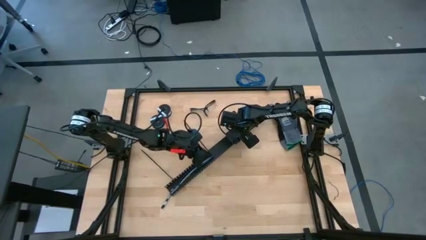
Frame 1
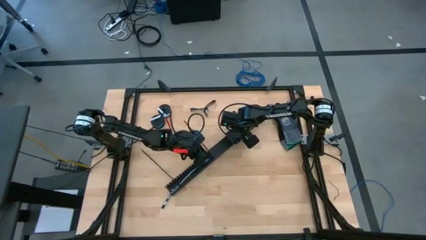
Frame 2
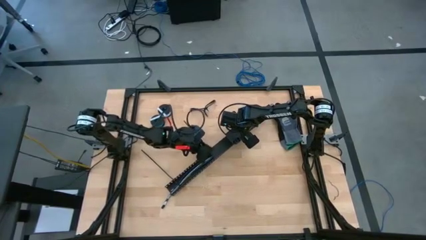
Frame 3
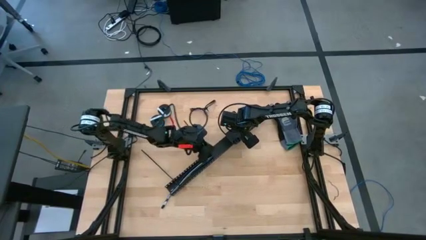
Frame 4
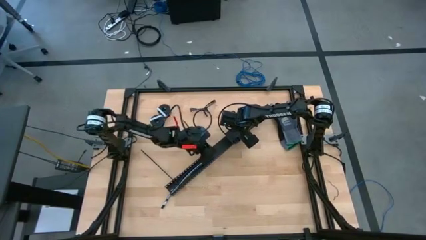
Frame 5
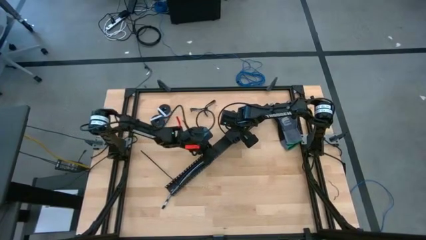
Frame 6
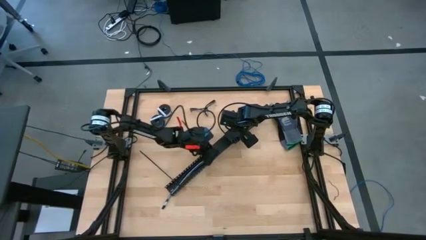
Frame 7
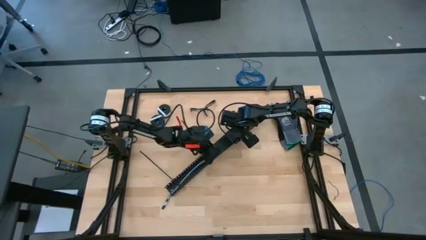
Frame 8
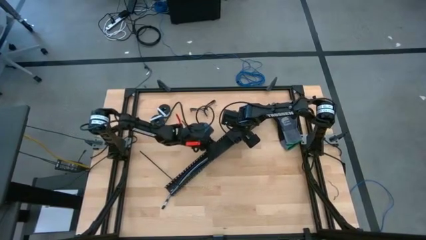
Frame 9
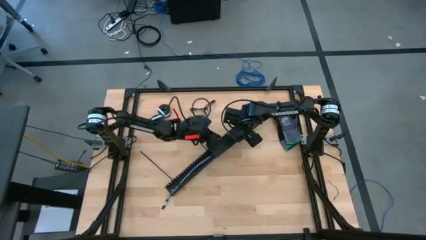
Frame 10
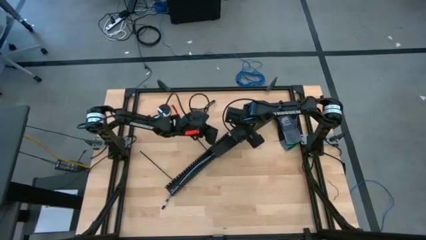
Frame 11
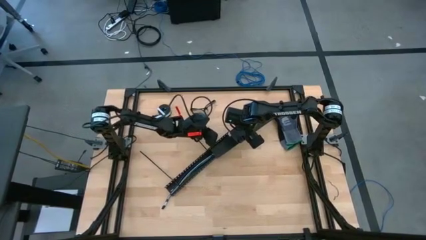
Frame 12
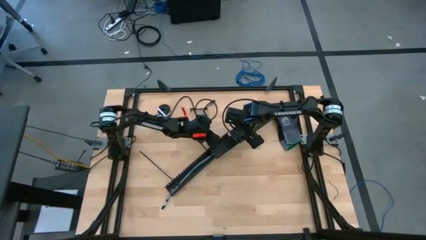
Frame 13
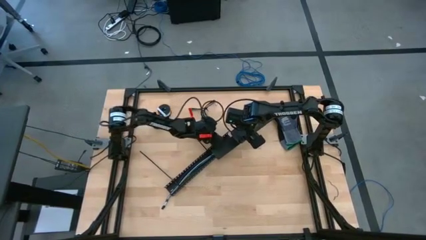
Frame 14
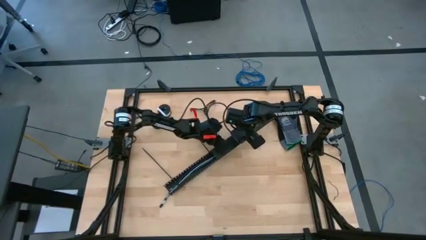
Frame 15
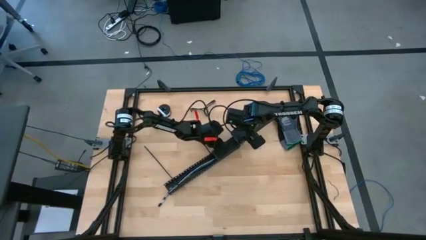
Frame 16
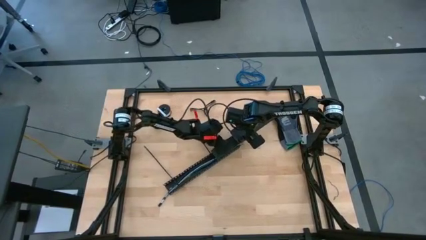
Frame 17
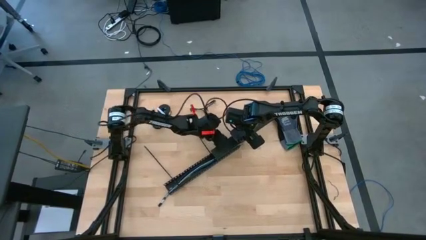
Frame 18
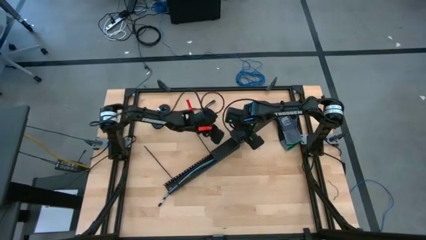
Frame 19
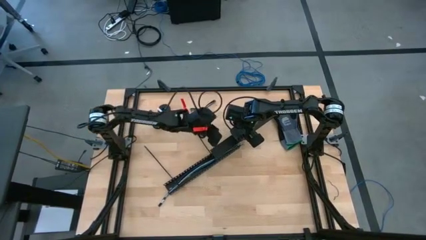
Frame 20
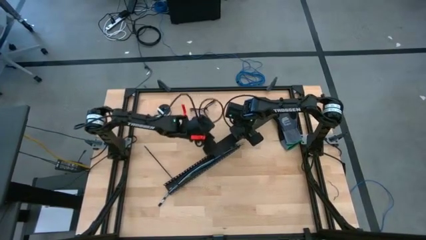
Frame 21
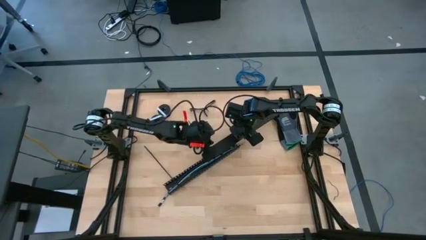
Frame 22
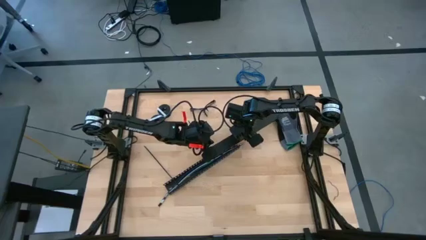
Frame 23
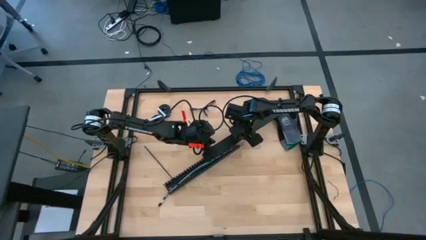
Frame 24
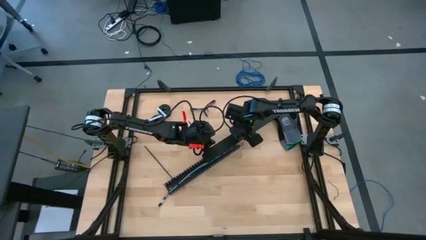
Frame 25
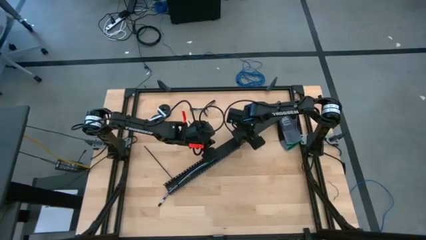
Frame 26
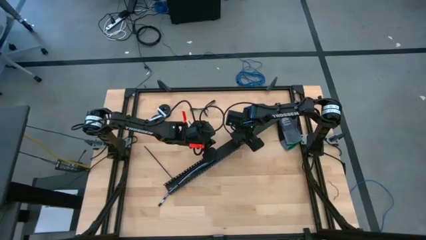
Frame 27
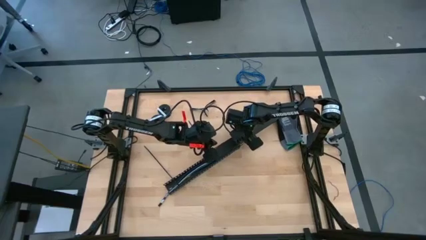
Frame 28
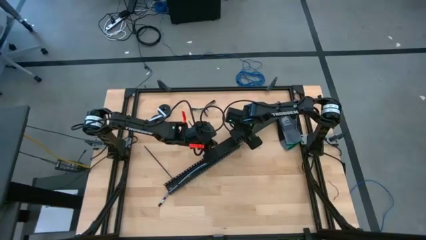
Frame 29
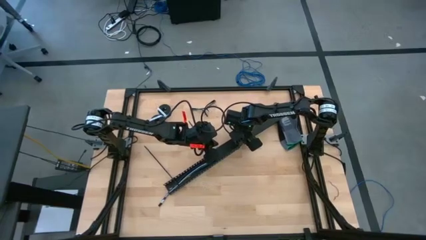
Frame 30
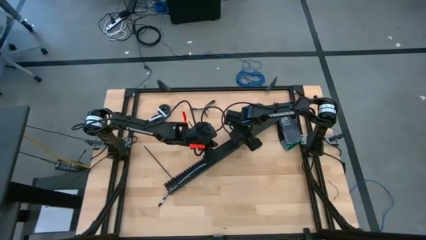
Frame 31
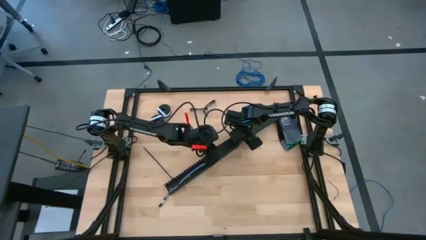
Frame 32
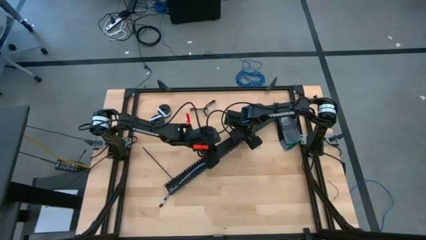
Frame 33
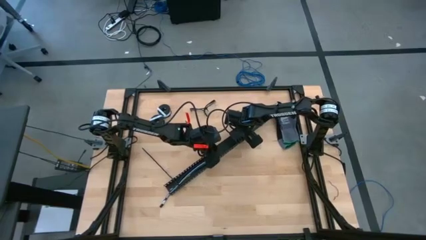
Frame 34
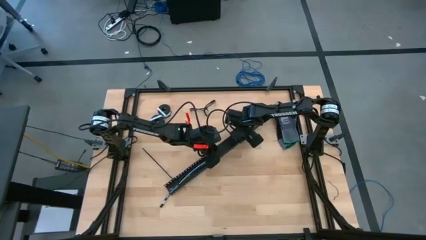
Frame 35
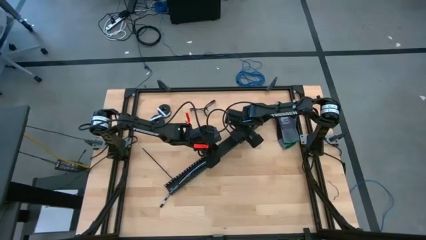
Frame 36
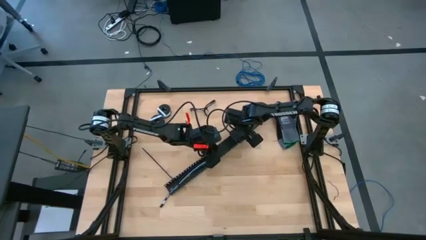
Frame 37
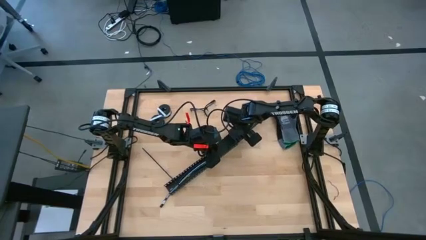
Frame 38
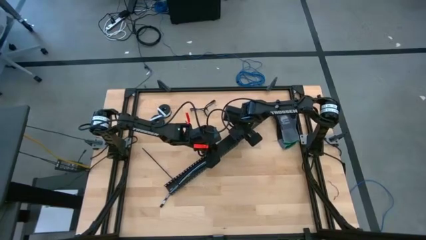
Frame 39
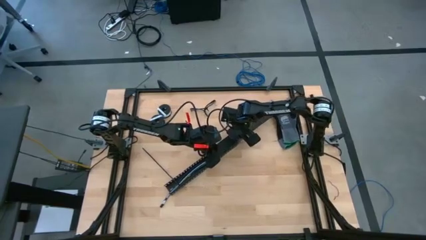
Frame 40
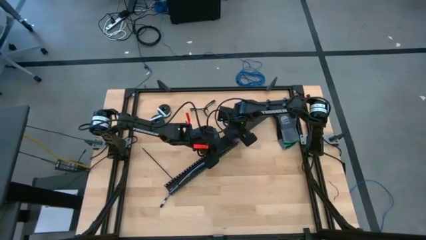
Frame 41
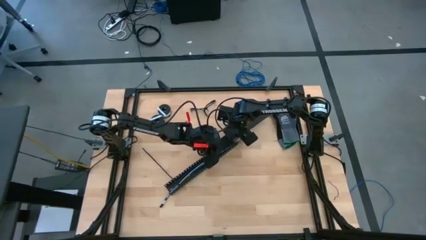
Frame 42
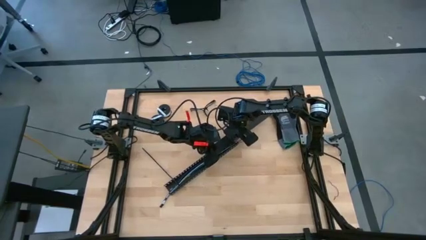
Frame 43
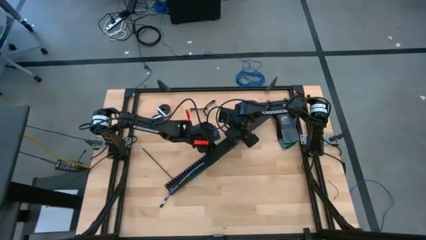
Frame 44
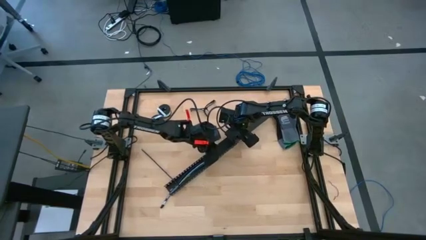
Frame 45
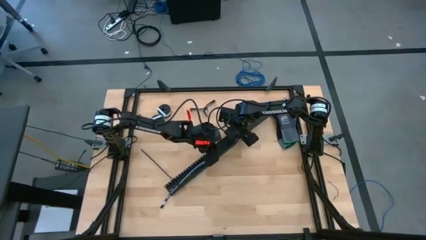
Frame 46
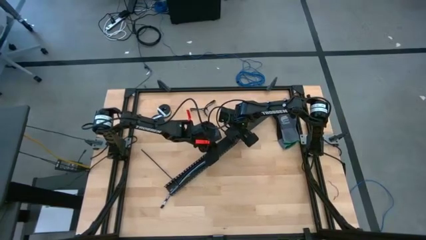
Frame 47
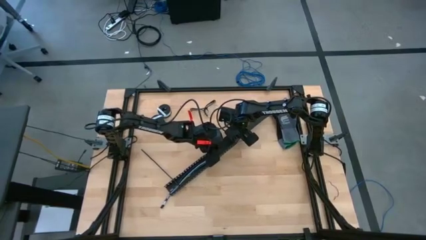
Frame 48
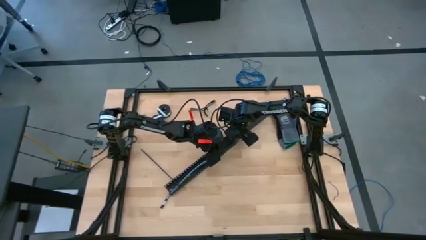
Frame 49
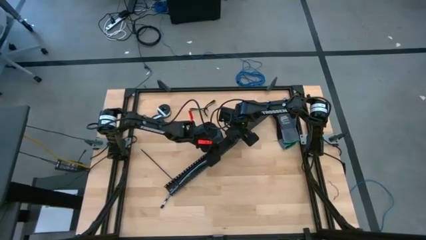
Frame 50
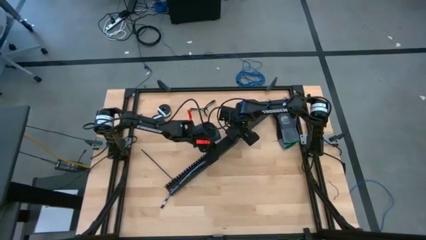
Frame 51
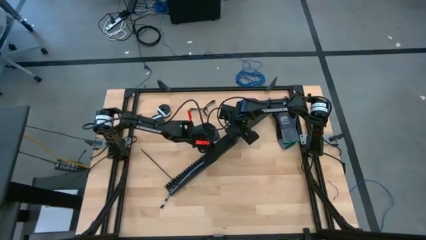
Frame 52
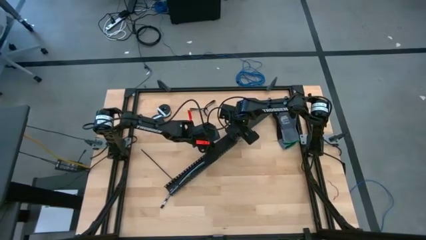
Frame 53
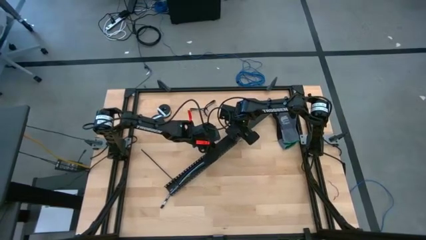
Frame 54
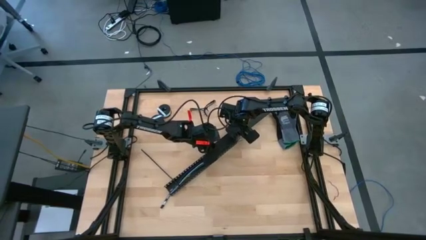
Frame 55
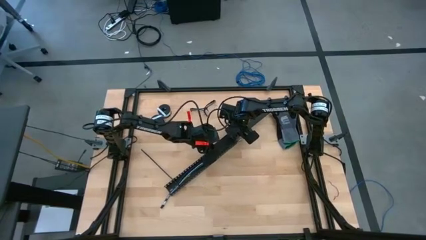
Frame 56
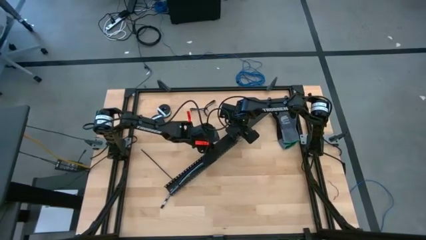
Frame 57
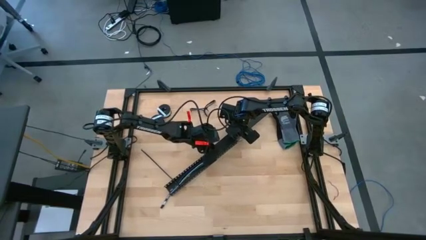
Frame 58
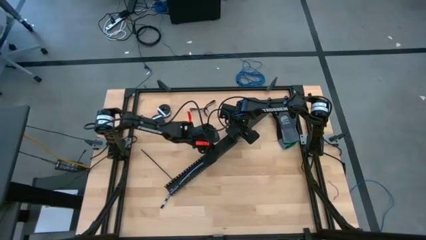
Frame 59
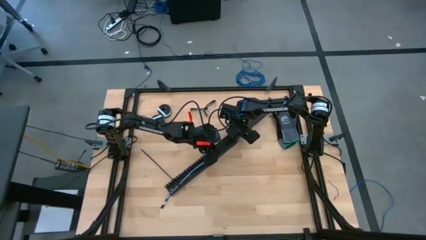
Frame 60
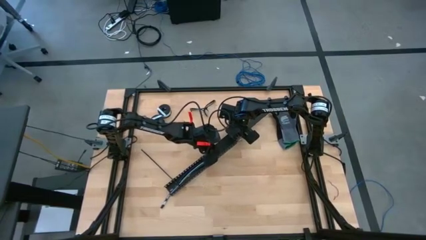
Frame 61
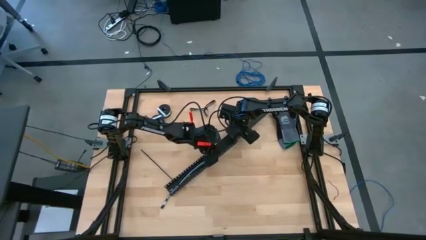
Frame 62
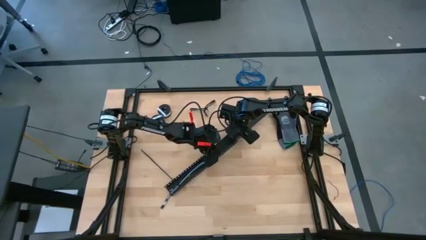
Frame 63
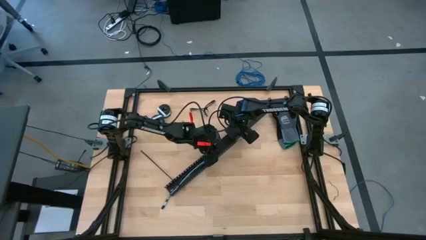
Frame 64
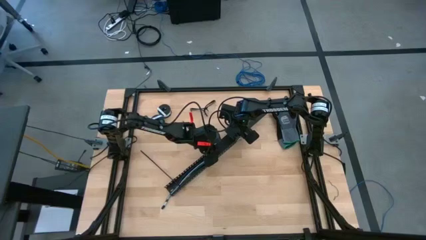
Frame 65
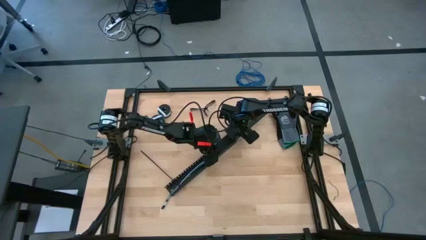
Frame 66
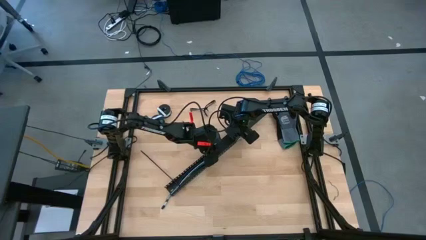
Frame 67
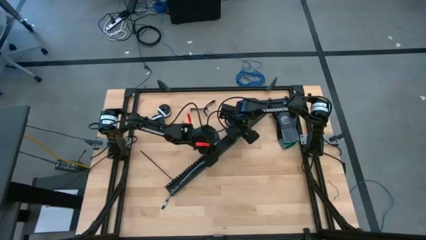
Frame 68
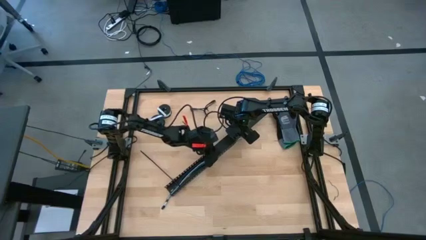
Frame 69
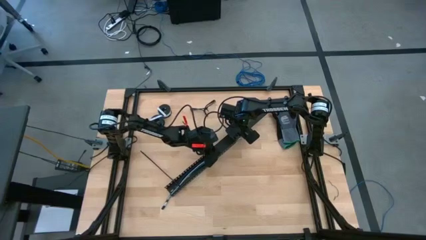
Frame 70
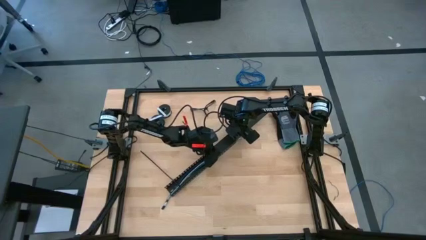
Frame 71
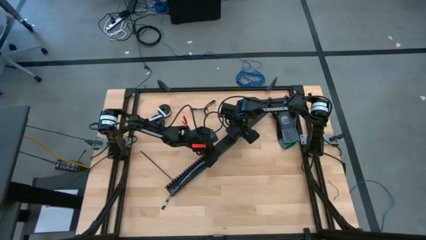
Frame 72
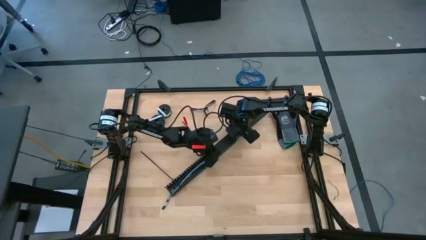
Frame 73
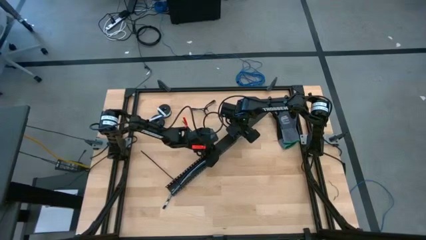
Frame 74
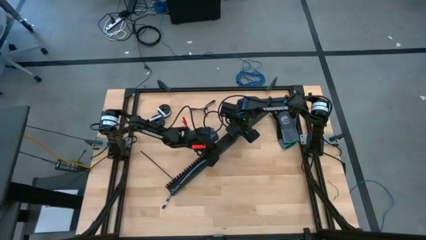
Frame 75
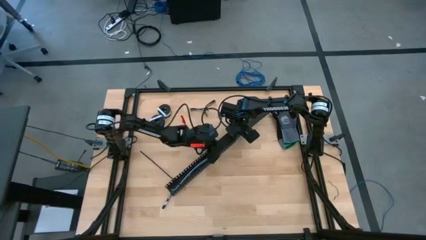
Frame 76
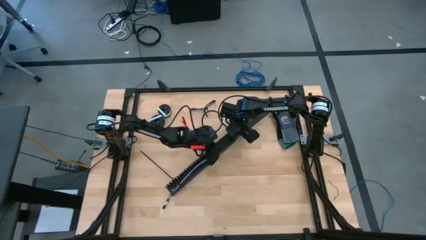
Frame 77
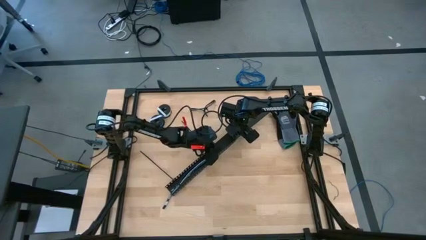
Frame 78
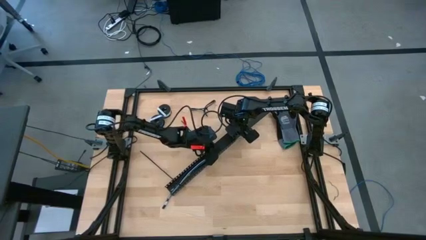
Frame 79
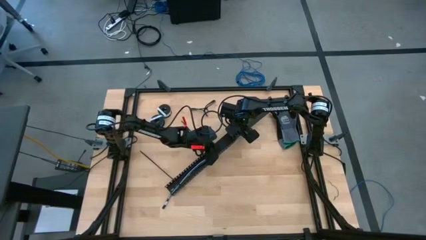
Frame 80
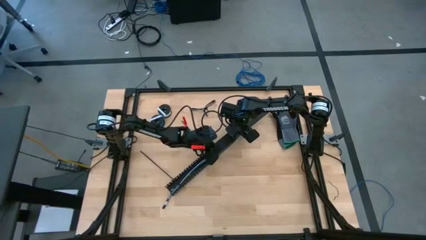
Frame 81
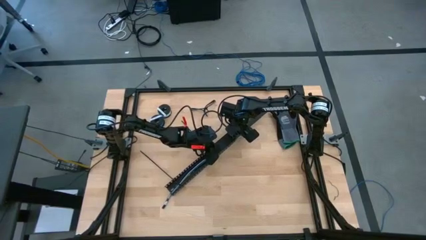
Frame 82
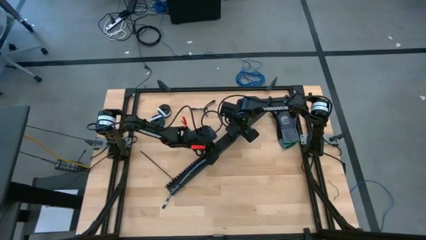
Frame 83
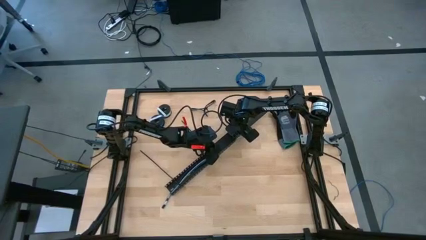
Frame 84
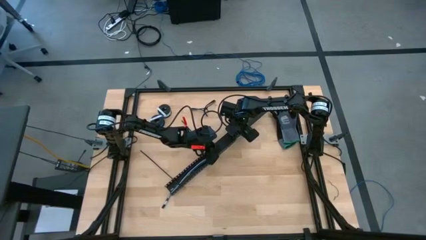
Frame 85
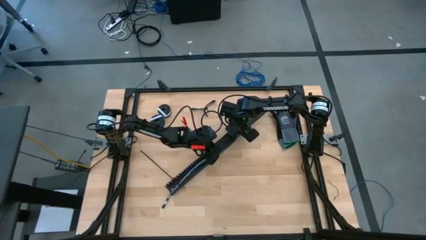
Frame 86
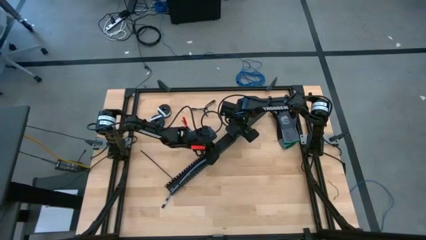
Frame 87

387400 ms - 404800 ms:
Task: Ziptie cables
Insert the black cover of the black cable duct
